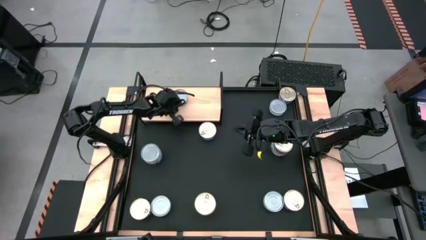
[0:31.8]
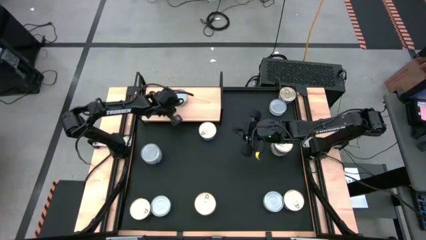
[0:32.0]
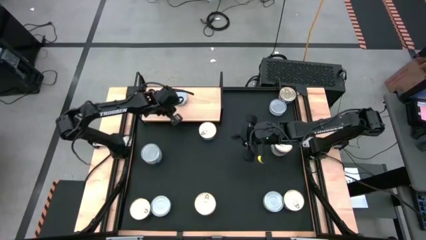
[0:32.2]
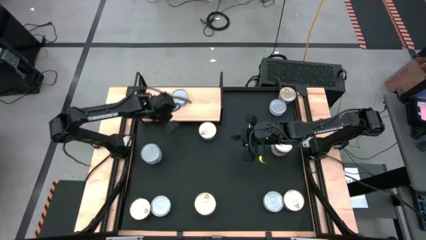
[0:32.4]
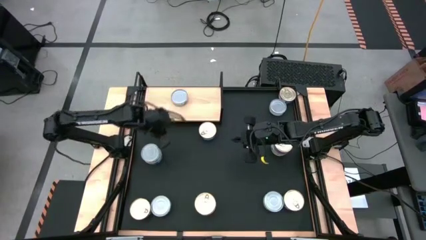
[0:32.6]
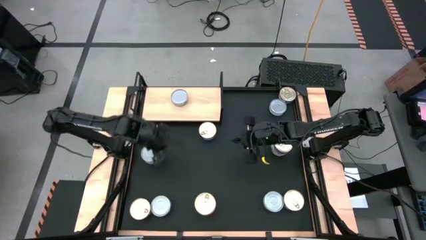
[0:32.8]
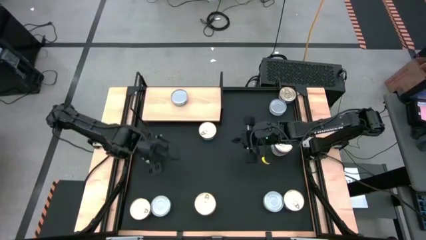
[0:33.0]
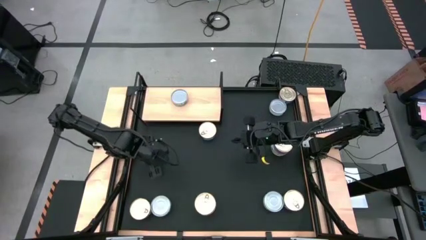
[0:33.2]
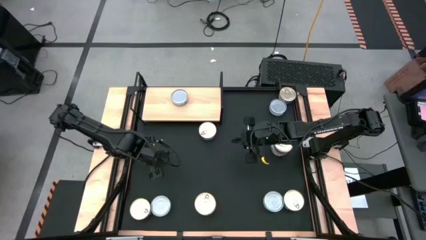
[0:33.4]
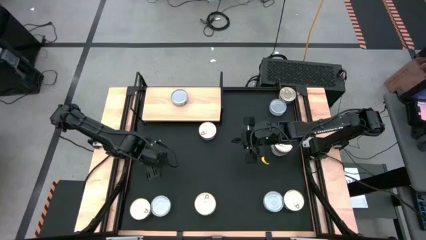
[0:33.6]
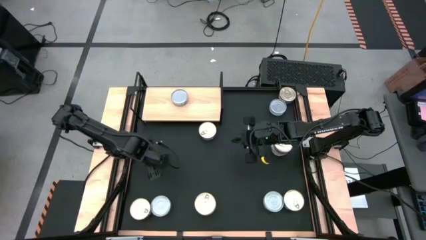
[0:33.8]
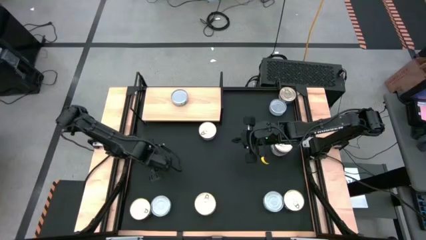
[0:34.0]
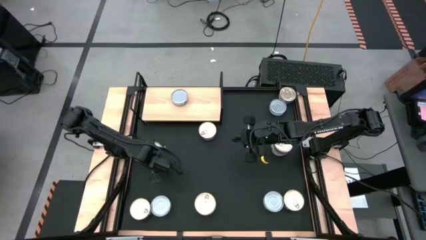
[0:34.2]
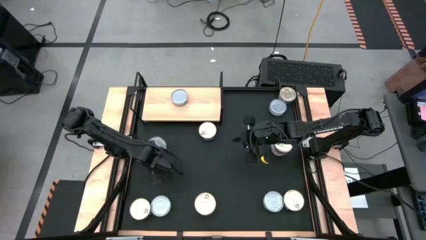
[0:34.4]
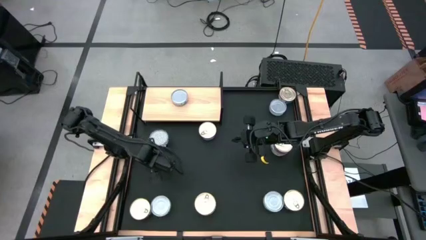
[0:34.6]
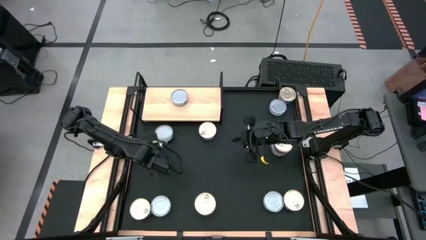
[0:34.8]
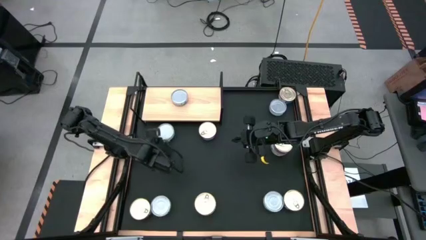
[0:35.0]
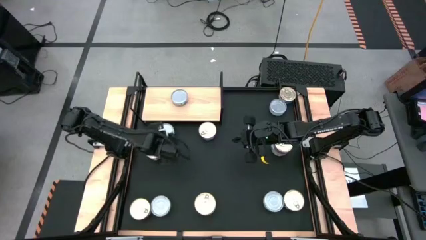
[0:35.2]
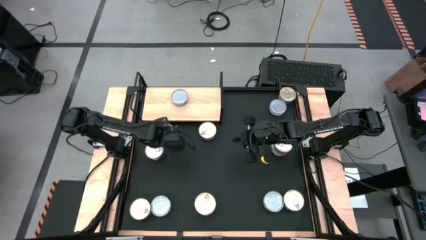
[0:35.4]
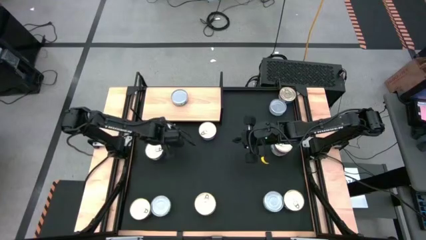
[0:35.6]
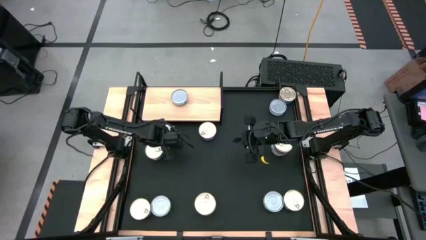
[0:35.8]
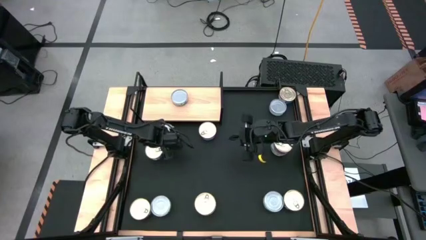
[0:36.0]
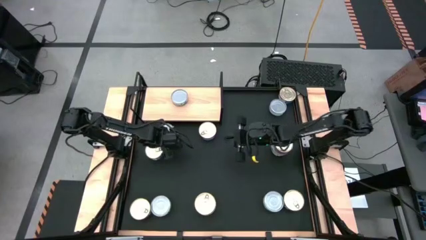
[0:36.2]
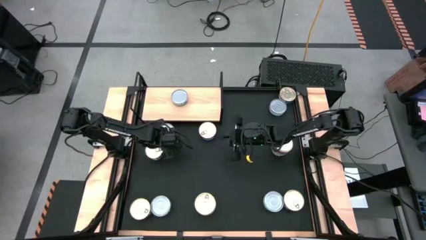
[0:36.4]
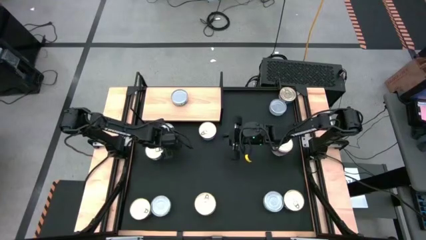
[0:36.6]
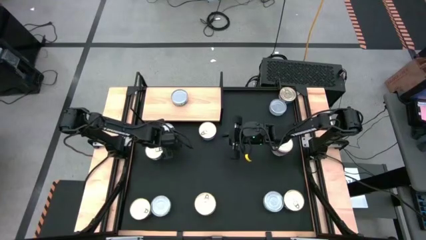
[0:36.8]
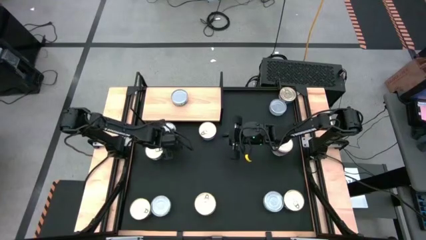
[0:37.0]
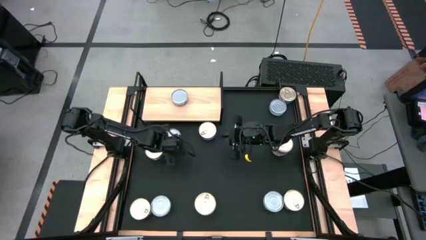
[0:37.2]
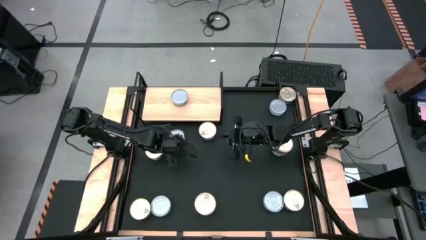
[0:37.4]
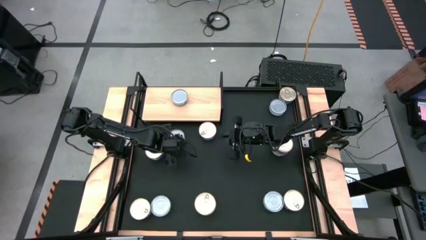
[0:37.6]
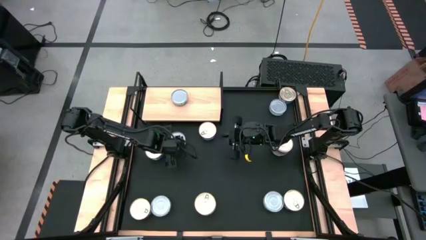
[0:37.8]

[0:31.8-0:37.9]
Task: Stack canned seafood by type on shelf
Put the green tuna can on the shelf

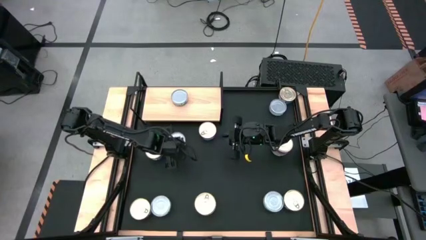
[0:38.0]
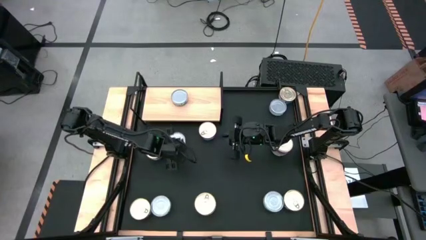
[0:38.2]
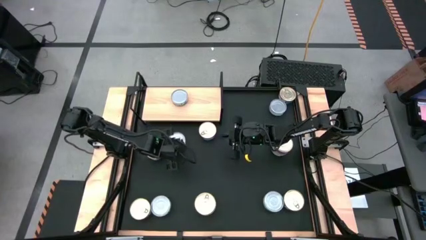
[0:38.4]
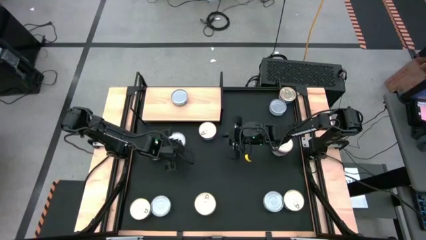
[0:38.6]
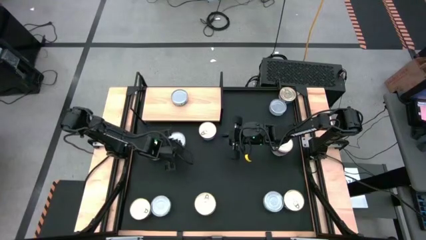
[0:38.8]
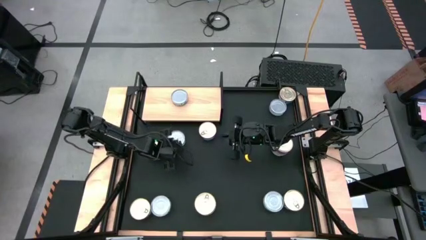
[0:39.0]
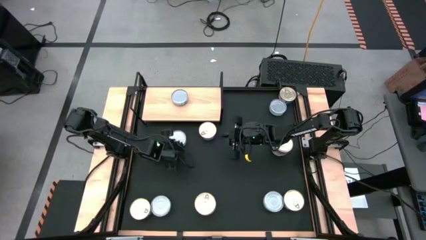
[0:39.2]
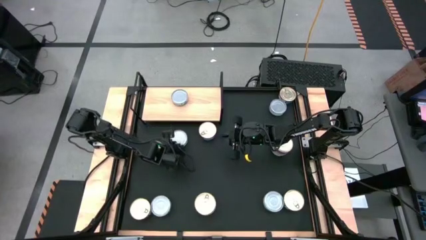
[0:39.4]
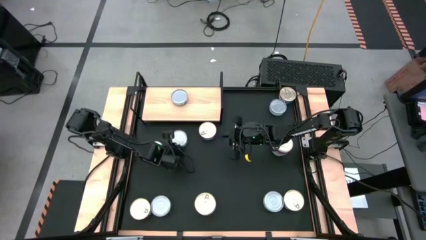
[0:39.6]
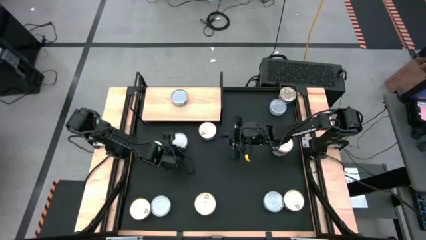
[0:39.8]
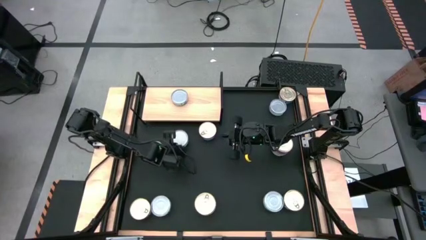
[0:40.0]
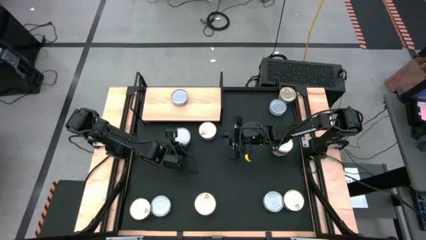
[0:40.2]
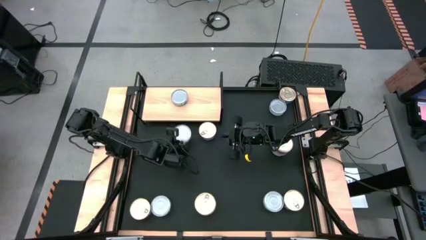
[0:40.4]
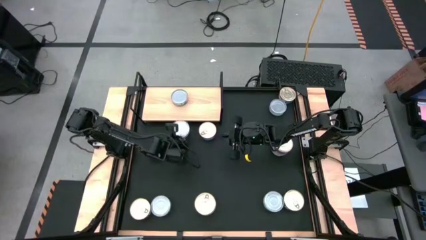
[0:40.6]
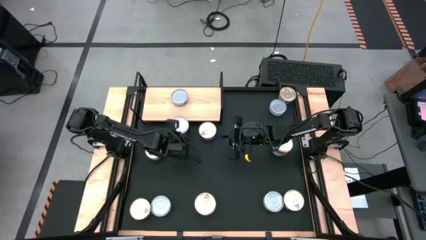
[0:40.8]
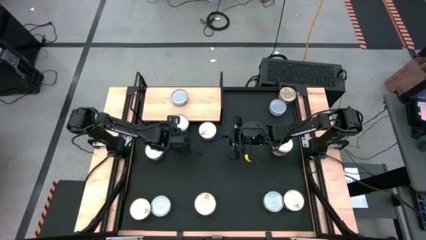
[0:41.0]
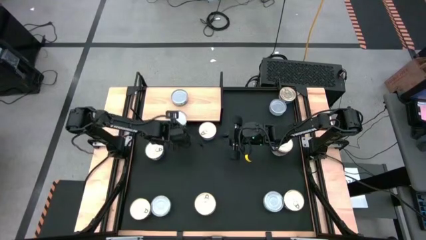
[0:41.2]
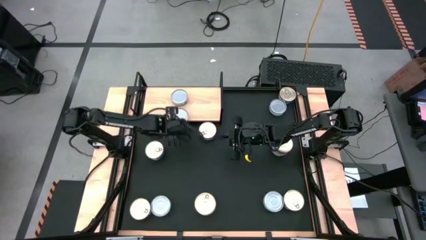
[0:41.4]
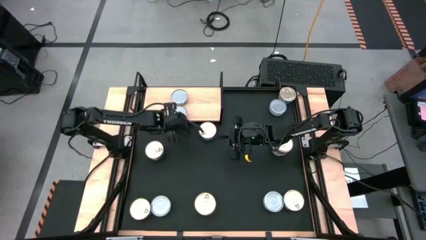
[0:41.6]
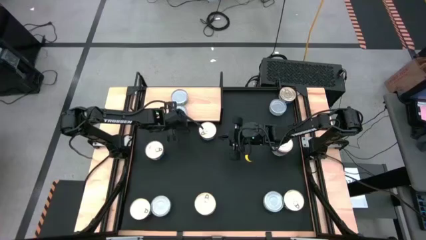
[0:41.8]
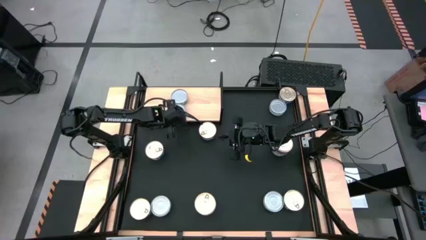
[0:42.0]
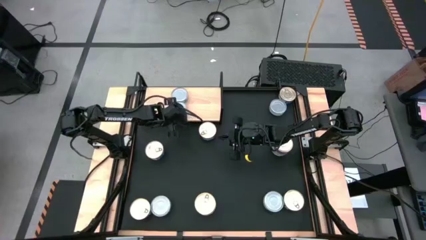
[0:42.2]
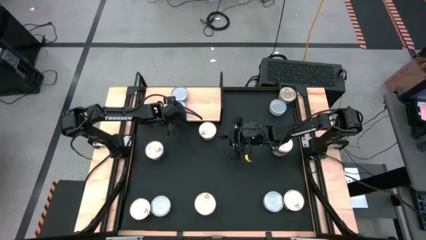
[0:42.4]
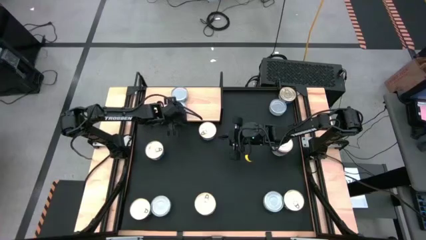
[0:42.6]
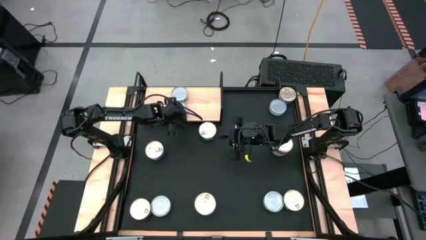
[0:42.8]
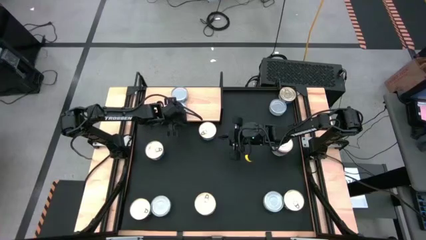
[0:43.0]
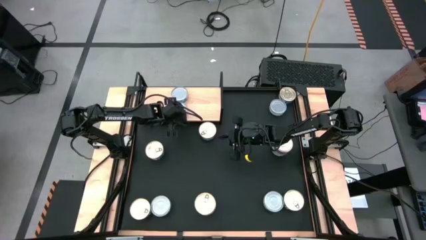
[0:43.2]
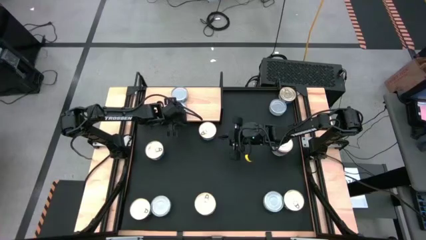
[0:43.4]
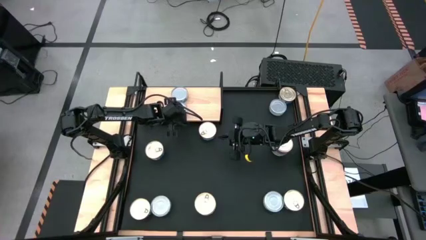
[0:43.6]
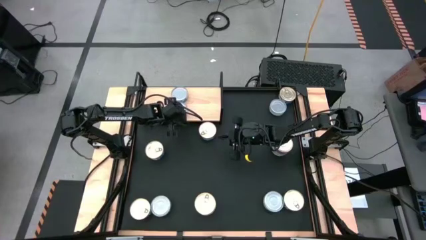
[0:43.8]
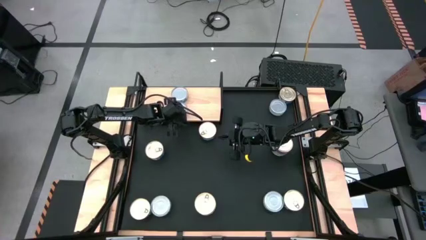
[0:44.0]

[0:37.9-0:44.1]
Put the green tuna can on the shelf

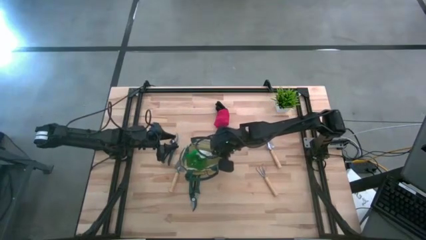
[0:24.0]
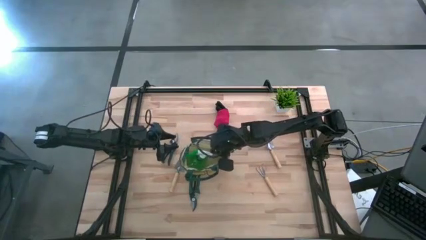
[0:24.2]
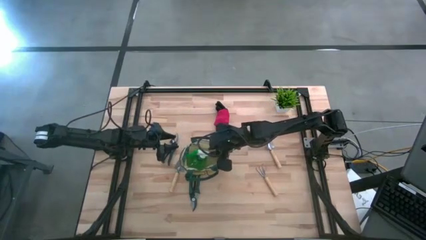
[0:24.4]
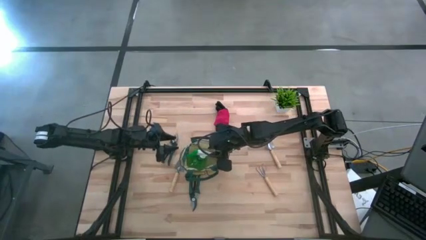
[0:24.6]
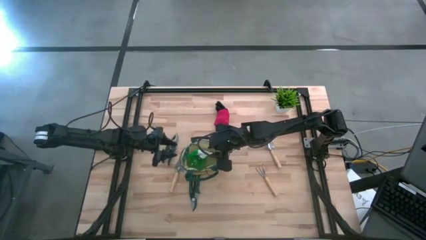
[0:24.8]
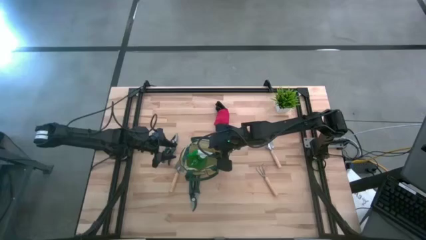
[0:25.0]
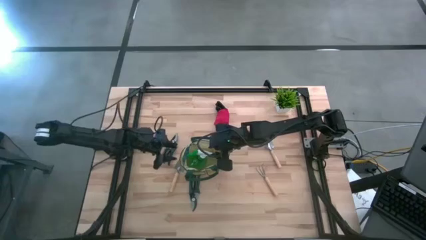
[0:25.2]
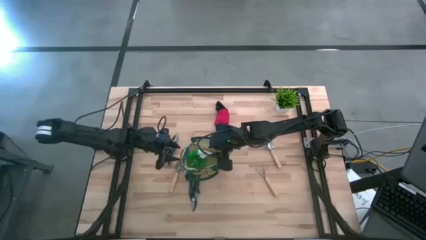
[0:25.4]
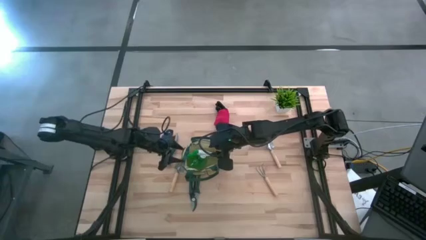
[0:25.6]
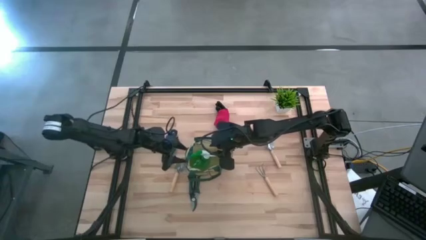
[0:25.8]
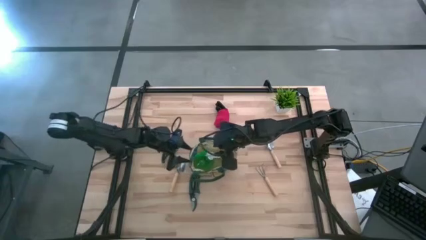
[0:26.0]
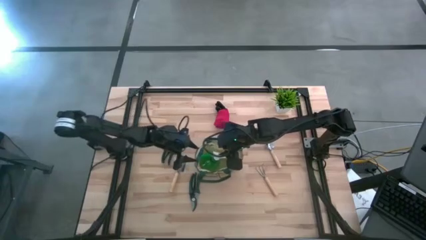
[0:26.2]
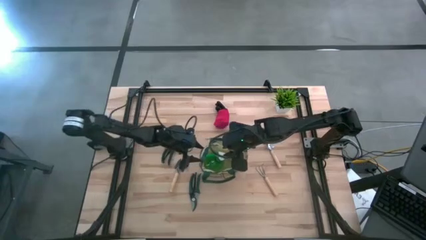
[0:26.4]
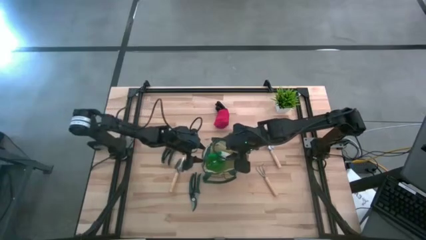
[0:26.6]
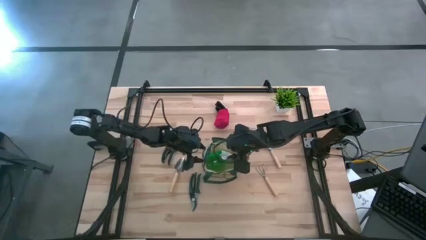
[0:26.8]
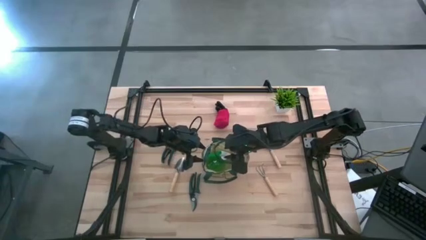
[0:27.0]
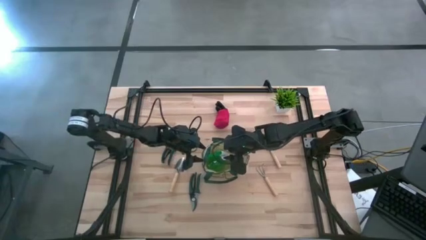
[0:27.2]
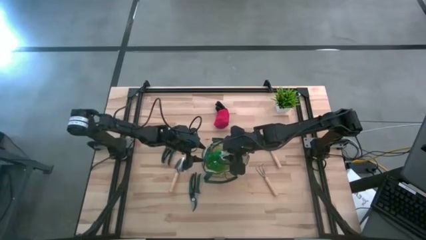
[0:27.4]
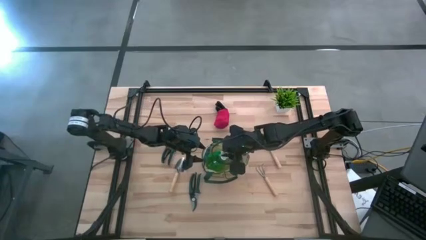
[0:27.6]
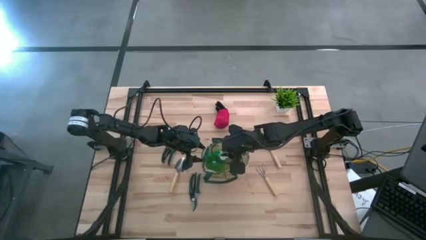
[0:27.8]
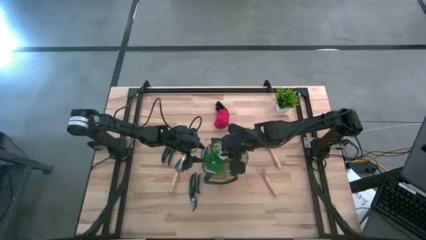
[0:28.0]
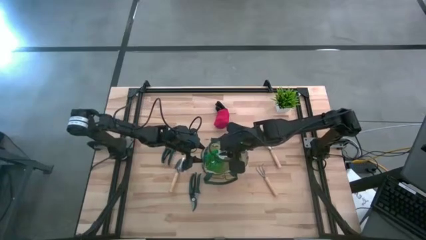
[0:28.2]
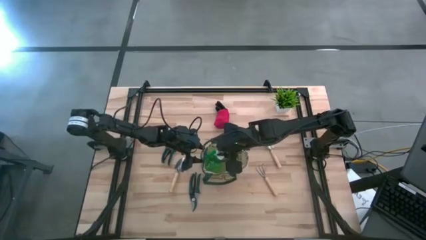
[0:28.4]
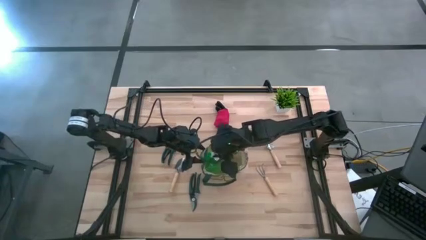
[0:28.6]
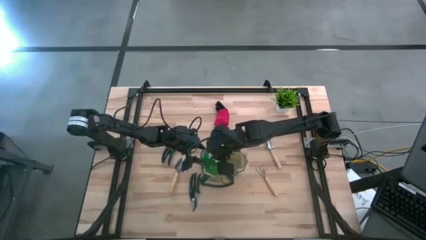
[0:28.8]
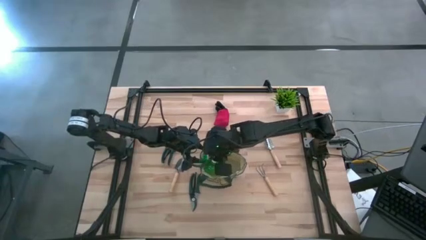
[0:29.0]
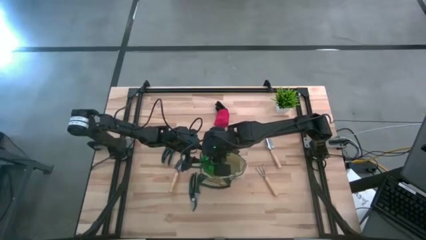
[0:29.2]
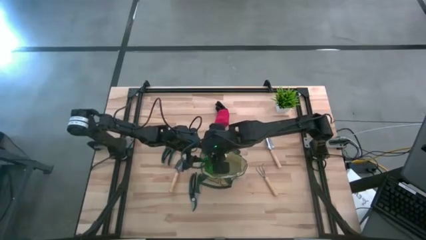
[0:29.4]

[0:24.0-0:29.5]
Task: Pick & Place Garden tools in Gardening bag
Adjust the spray bottle into the white gardening bag
